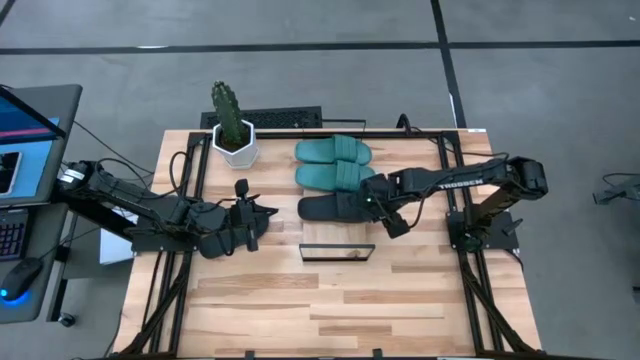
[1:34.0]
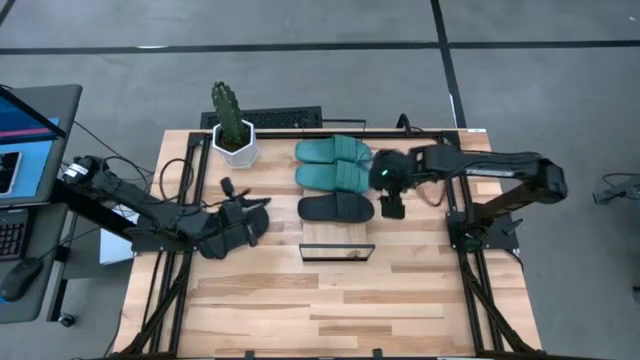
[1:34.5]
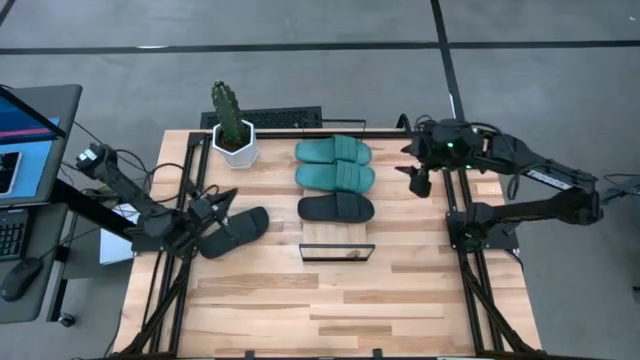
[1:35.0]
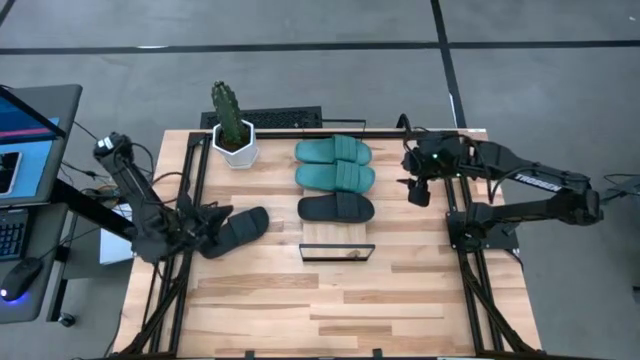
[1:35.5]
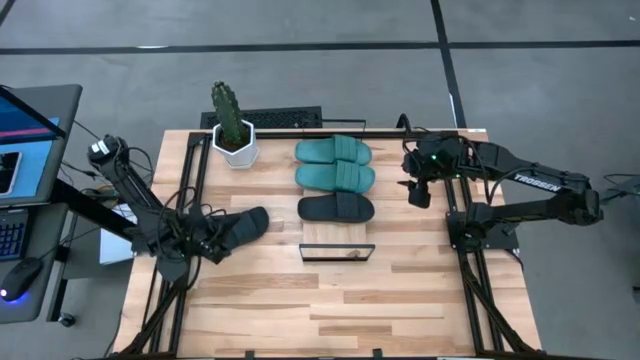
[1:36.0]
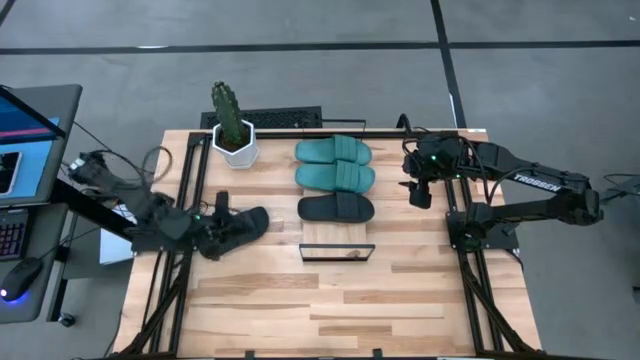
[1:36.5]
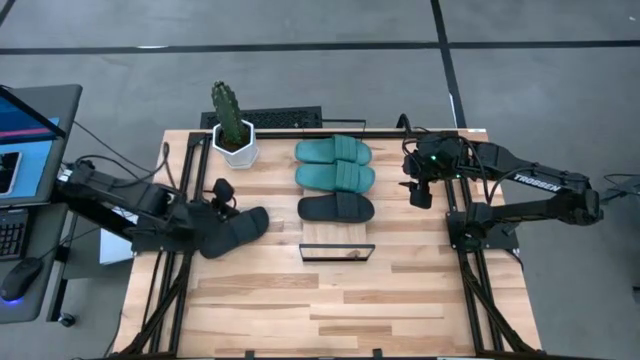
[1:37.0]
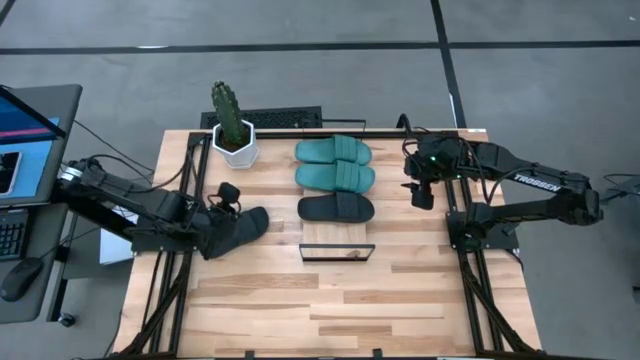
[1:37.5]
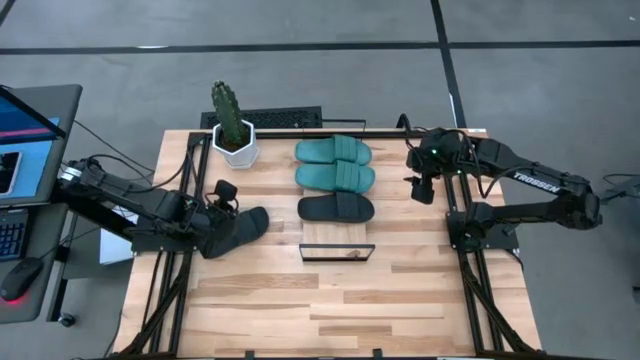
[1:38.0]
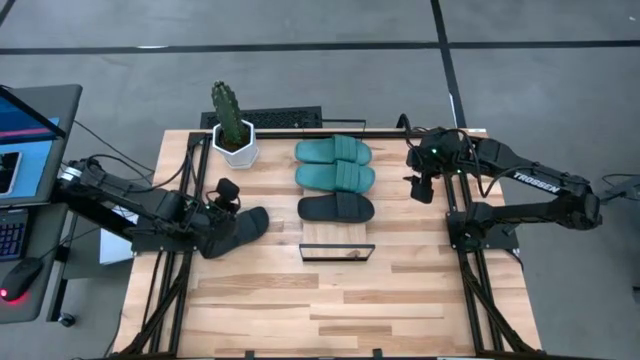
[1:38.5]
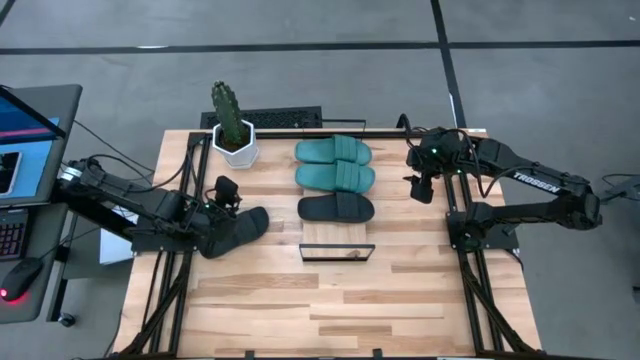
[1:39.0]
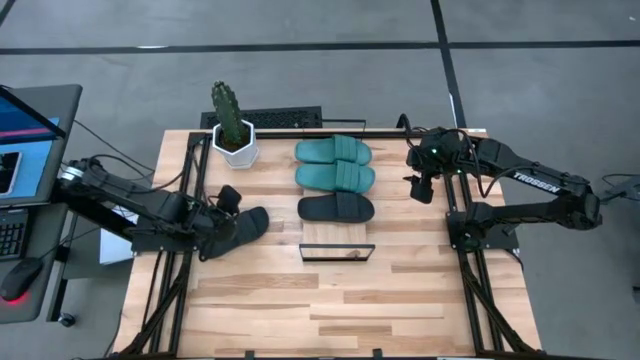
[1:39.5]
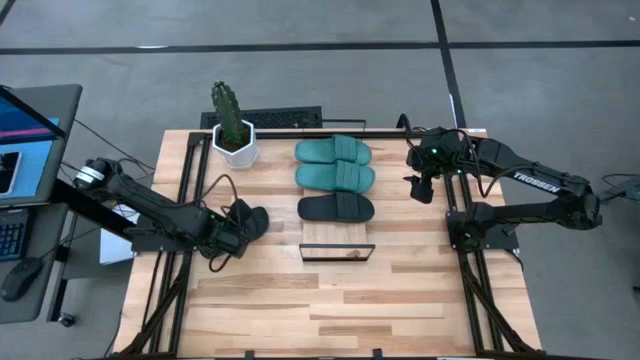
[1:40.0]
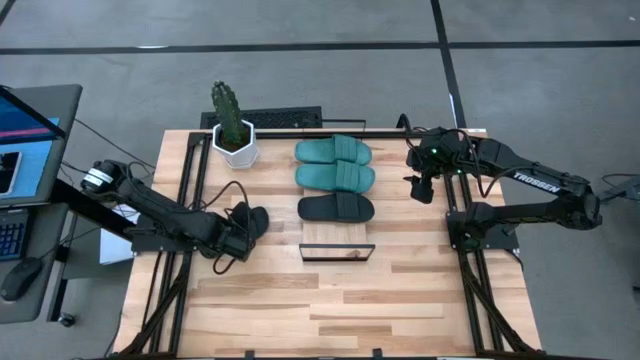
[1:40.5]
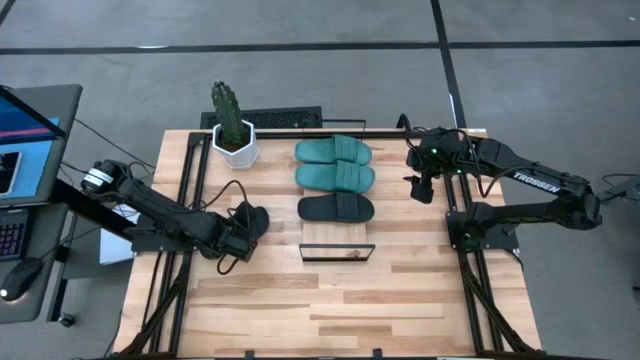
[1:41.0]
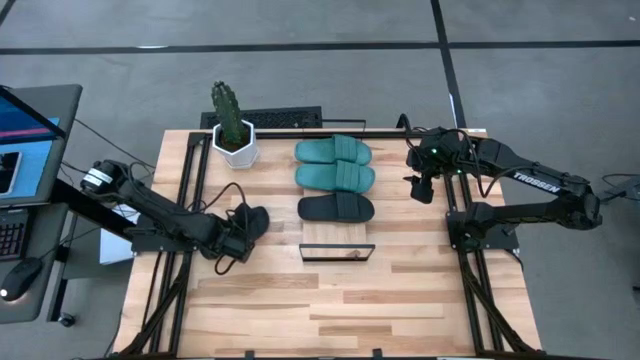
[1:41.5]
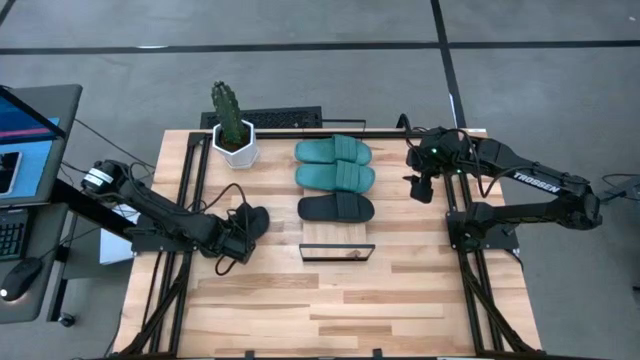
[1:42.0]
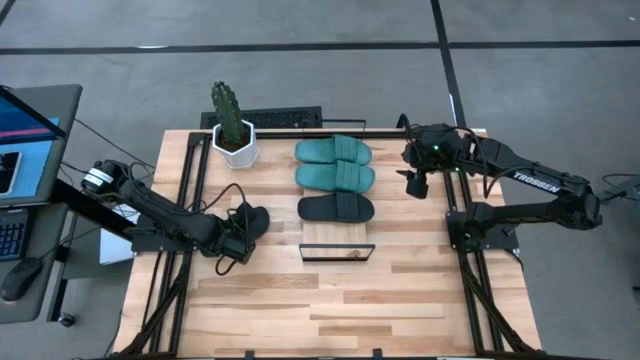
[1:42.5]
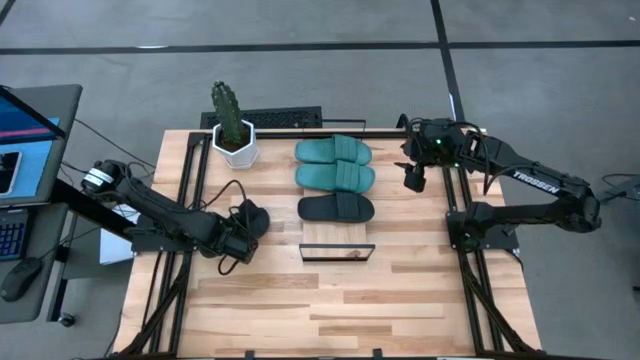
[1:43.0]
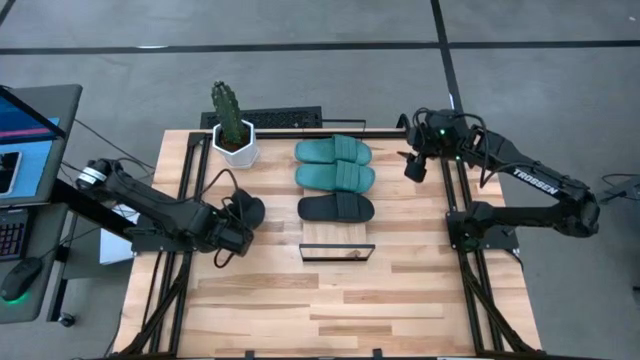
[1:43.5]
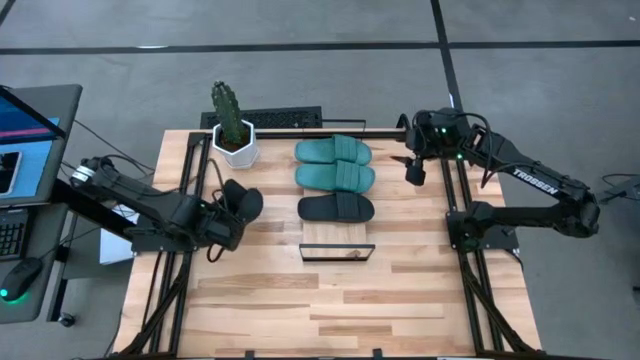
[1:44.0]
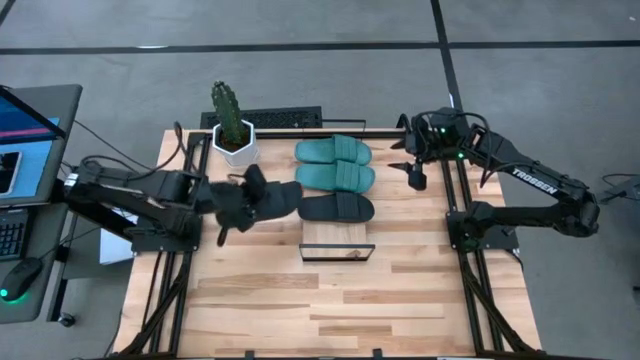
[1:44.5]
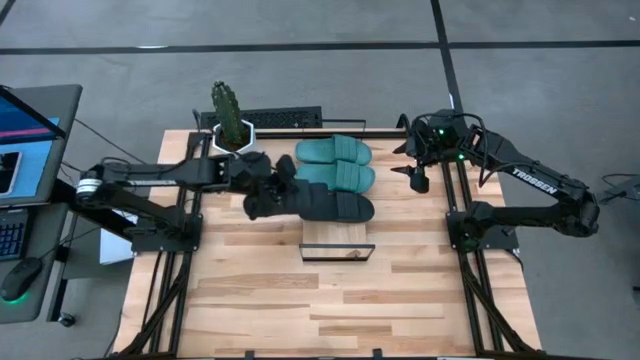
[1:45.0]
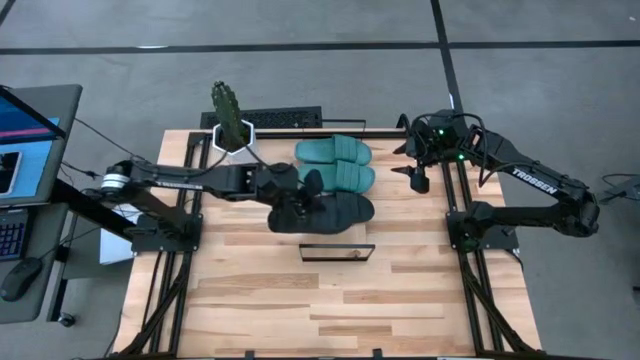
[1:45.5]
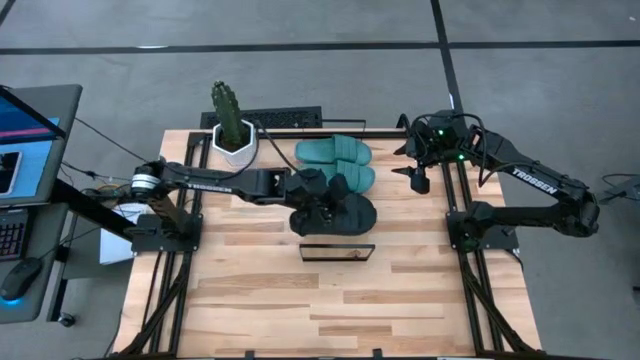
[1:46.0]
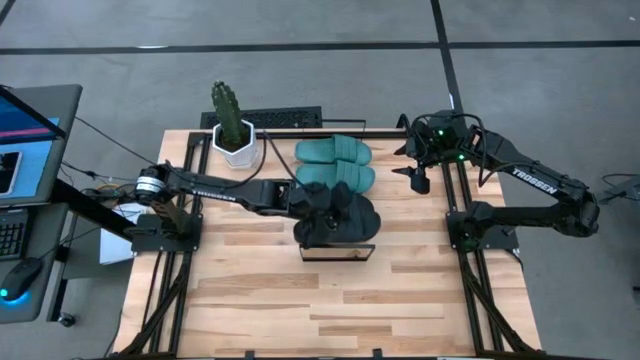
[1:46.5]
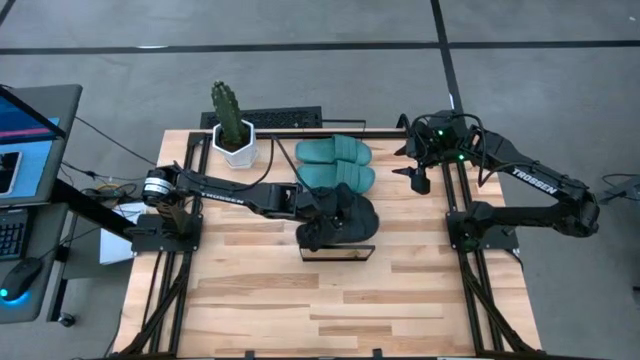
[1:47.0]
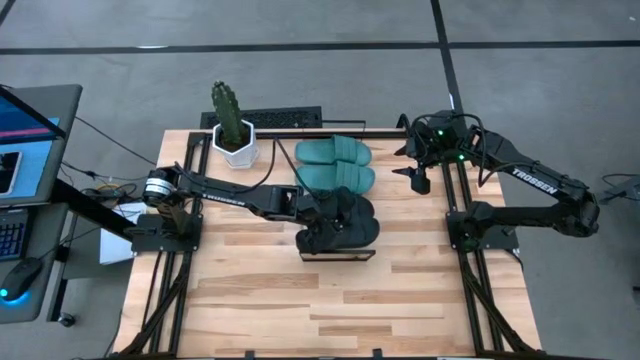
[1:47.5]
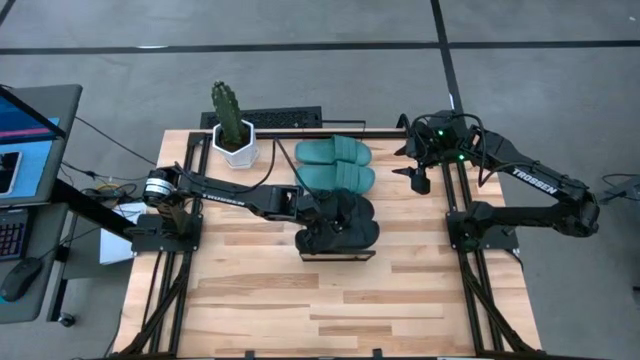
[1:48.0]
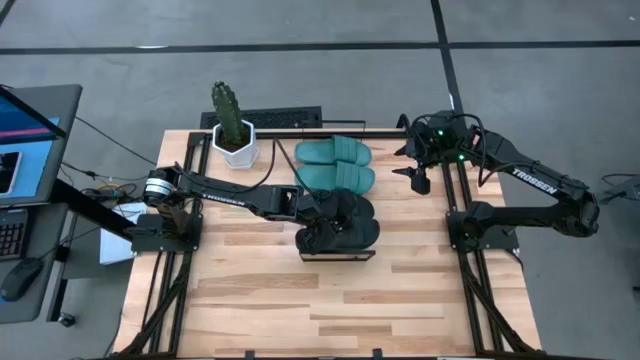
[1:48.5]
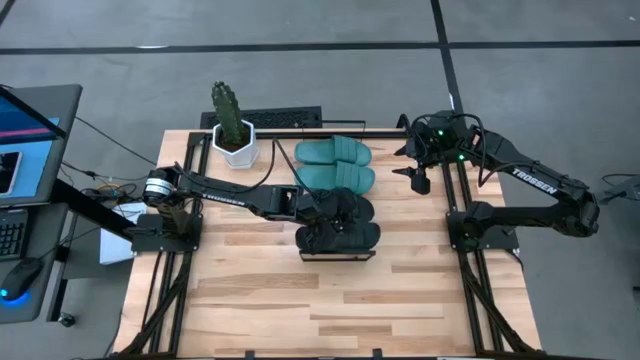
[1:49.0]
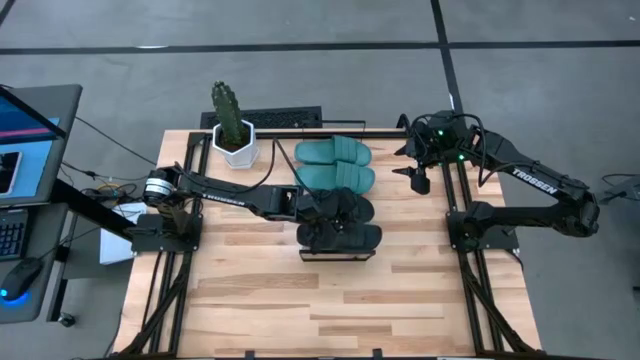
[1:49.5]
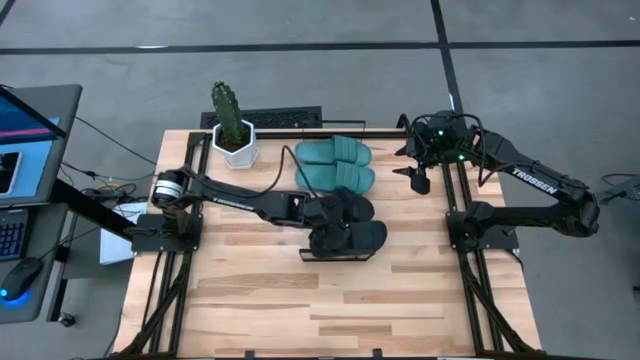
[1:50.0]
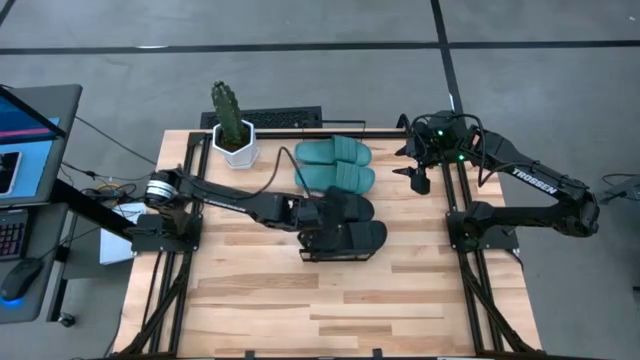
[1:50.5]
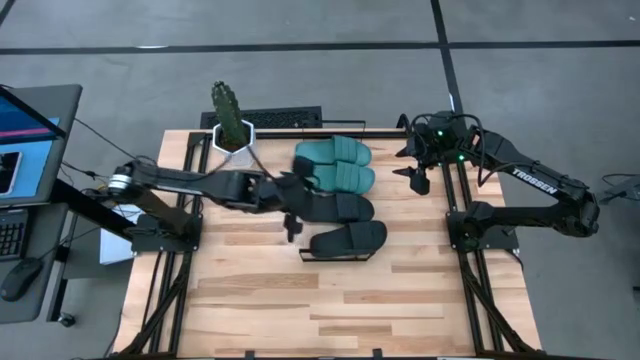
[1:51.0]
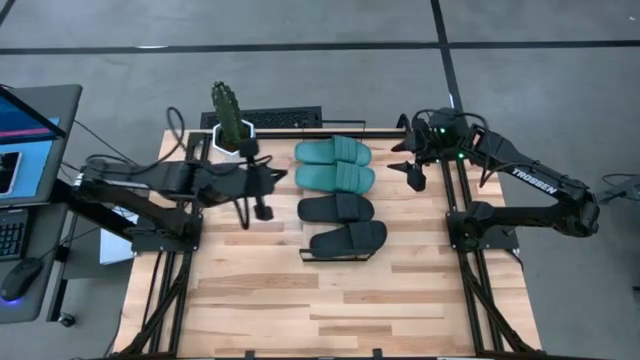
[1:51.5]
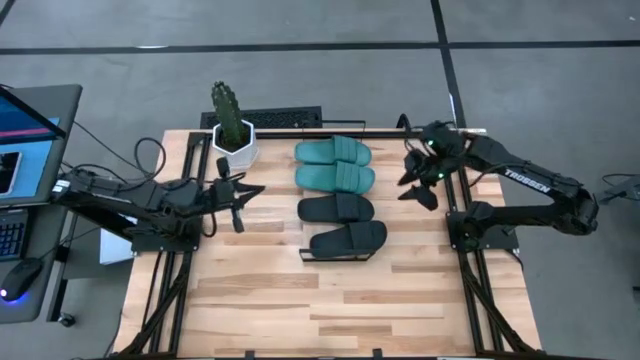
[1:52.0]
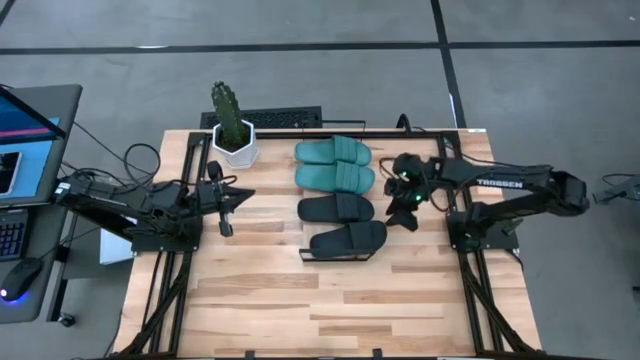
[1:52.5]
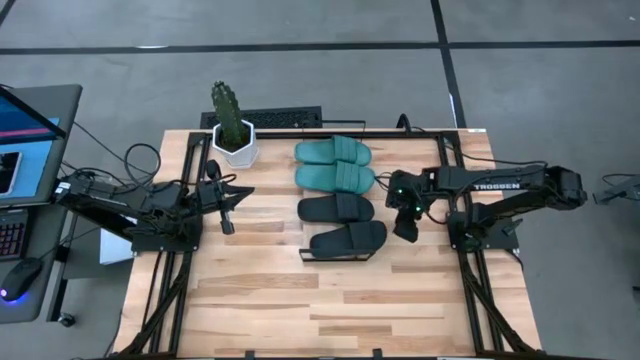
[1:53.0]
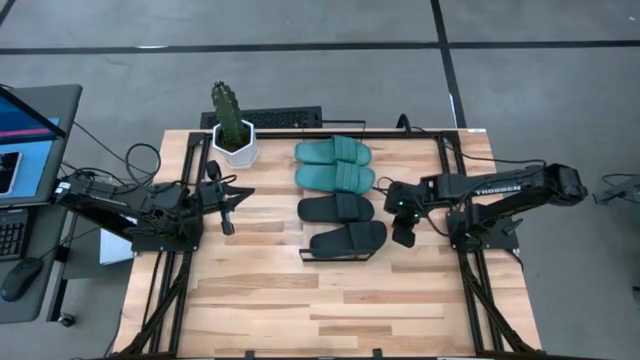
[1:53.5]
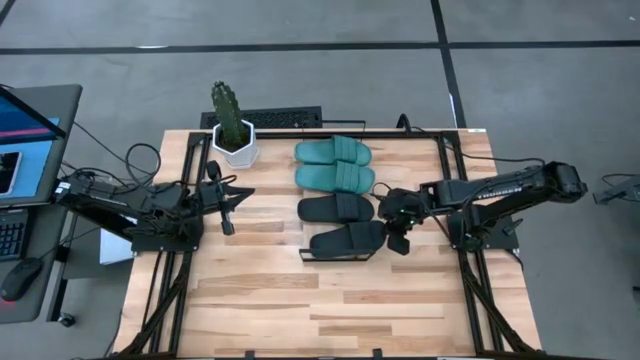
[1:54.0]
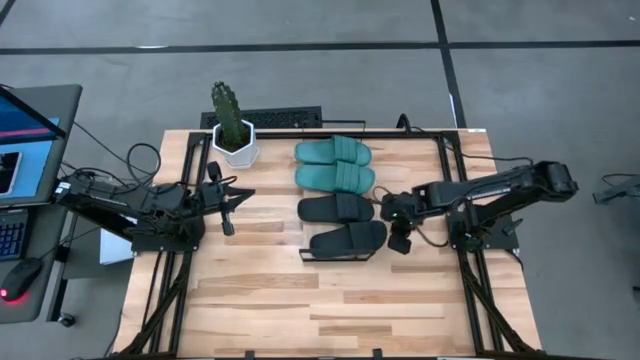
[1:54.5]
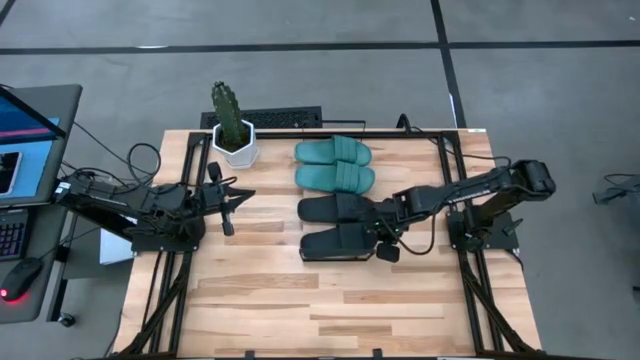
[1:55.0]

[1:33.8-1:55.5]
Task: Pick and place slides into the shelf
Put the black slide on the shelf
